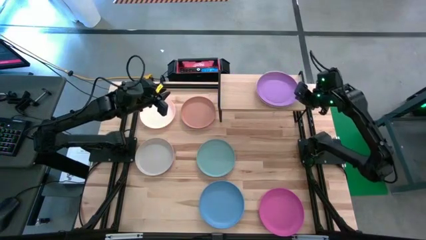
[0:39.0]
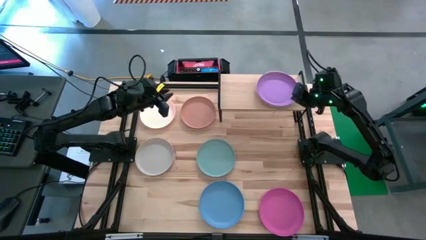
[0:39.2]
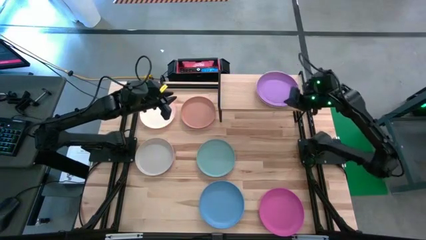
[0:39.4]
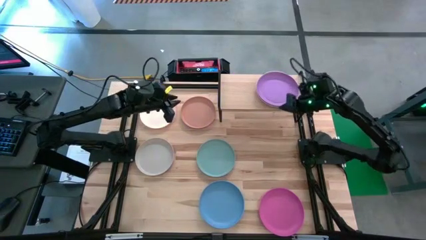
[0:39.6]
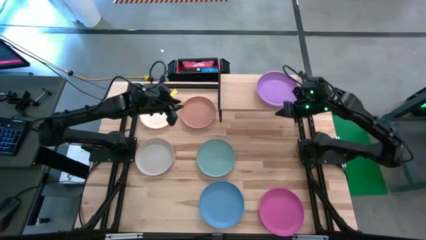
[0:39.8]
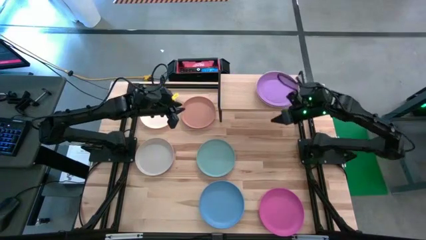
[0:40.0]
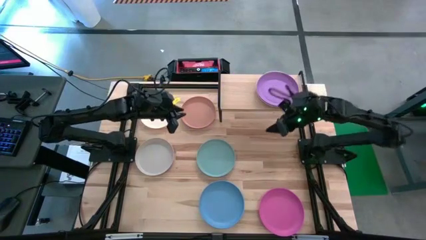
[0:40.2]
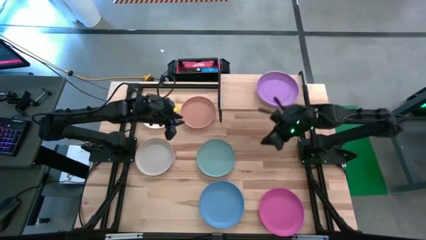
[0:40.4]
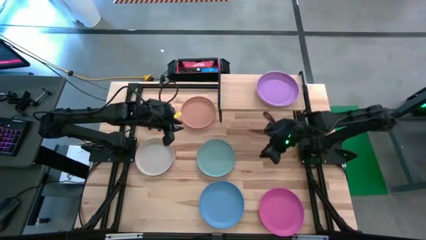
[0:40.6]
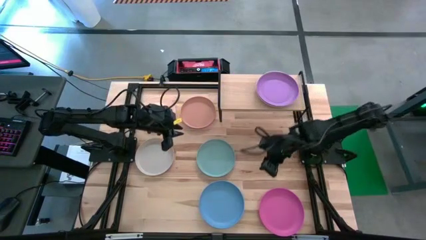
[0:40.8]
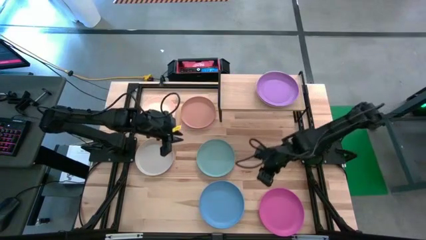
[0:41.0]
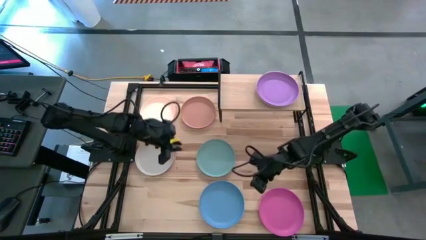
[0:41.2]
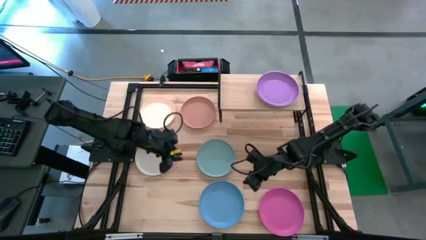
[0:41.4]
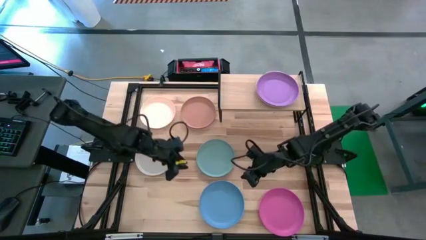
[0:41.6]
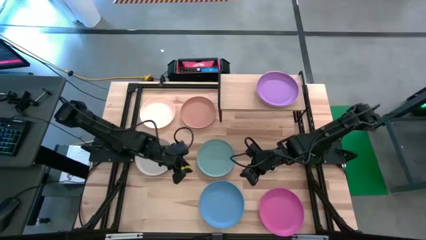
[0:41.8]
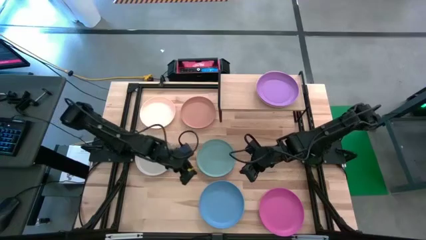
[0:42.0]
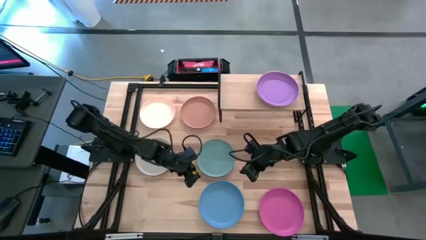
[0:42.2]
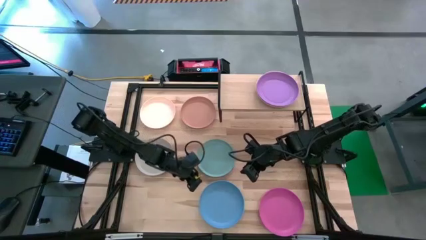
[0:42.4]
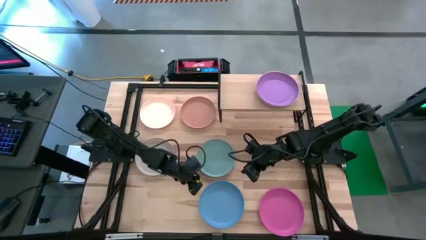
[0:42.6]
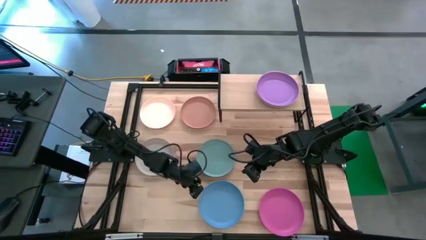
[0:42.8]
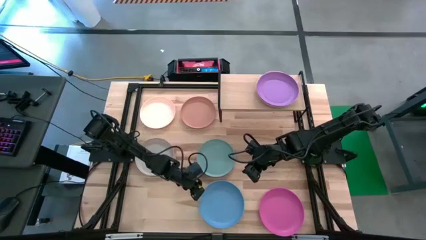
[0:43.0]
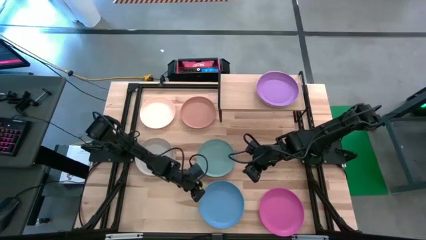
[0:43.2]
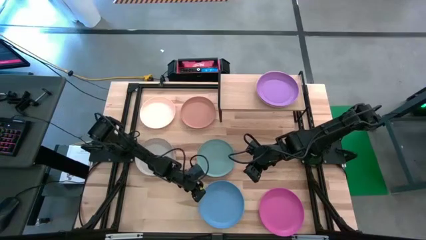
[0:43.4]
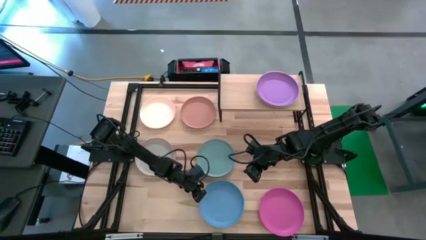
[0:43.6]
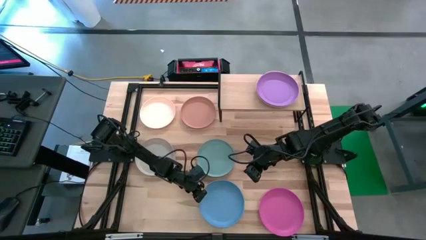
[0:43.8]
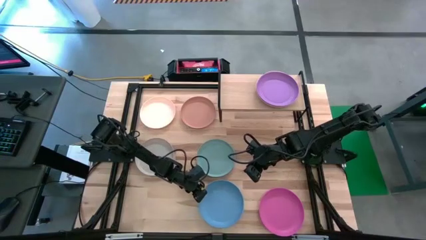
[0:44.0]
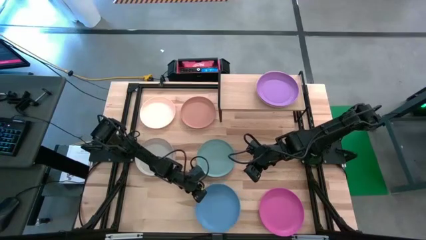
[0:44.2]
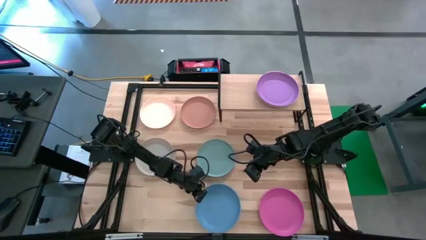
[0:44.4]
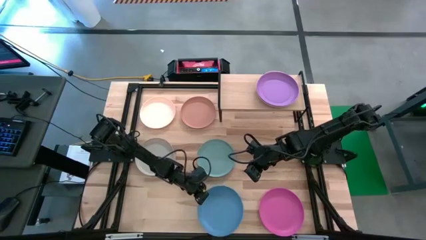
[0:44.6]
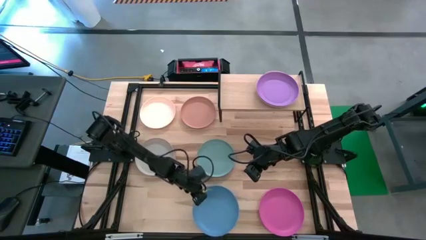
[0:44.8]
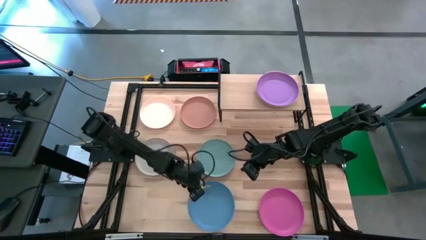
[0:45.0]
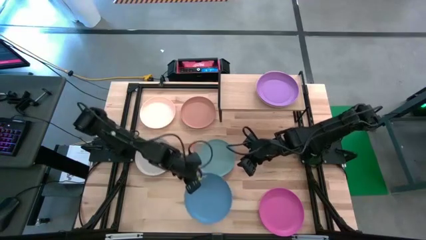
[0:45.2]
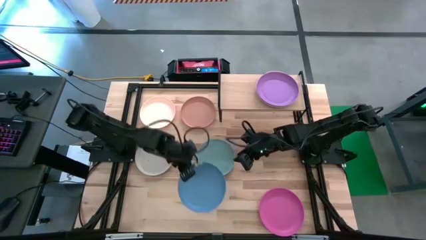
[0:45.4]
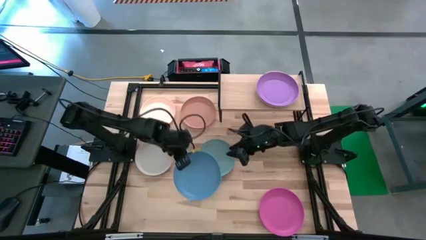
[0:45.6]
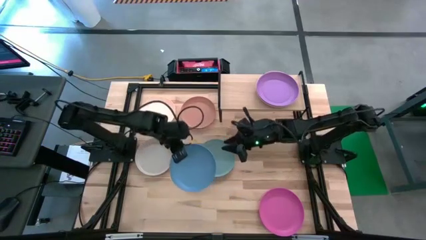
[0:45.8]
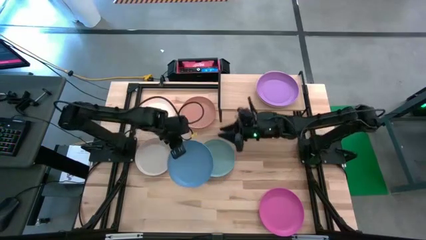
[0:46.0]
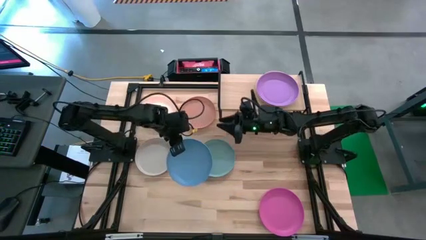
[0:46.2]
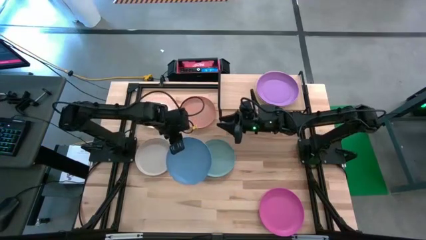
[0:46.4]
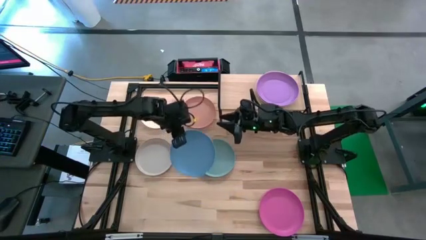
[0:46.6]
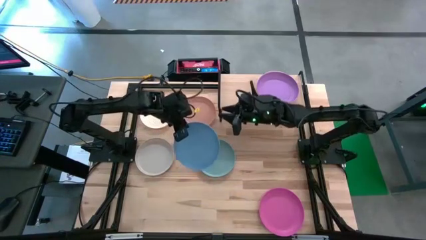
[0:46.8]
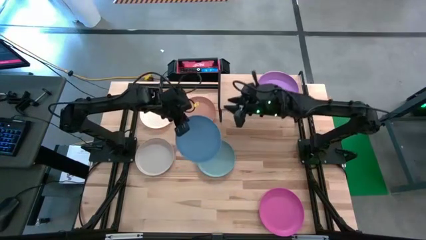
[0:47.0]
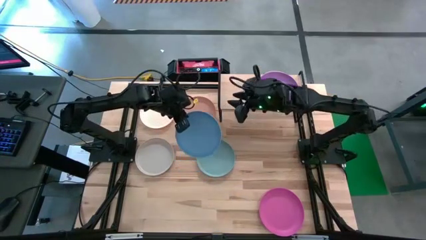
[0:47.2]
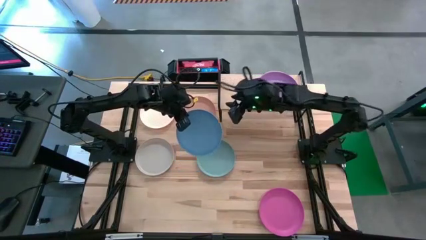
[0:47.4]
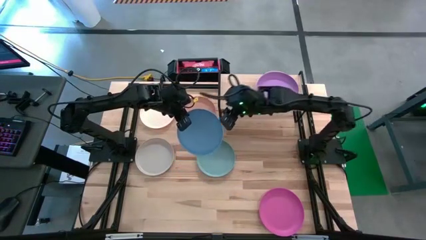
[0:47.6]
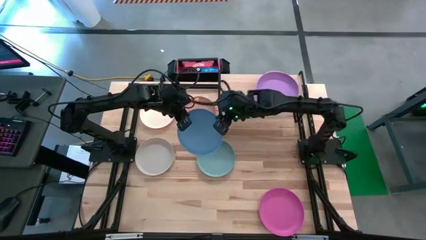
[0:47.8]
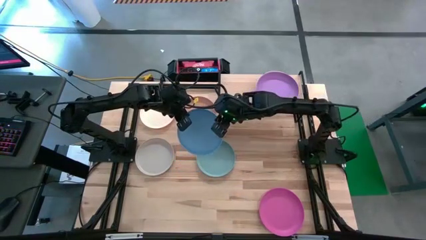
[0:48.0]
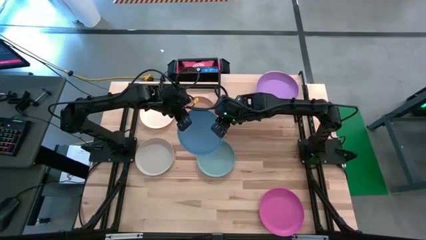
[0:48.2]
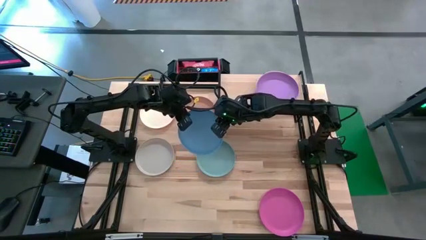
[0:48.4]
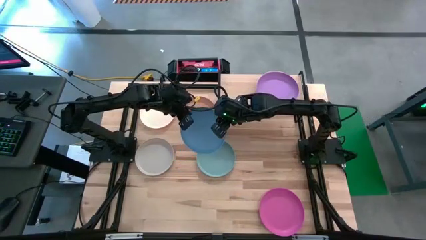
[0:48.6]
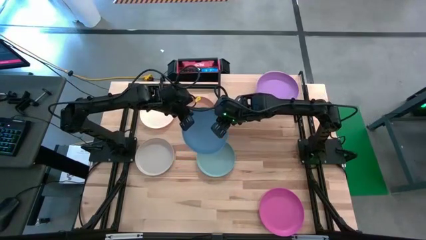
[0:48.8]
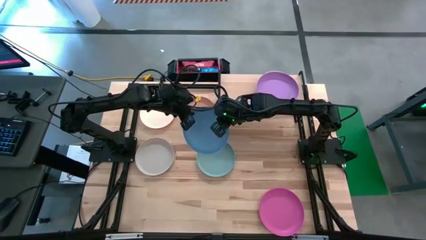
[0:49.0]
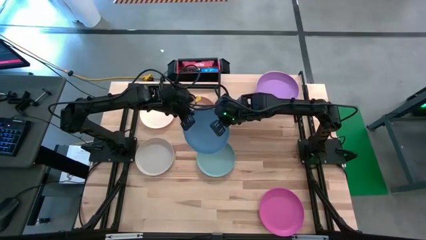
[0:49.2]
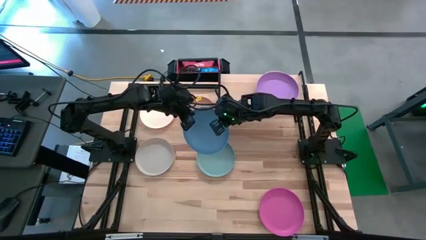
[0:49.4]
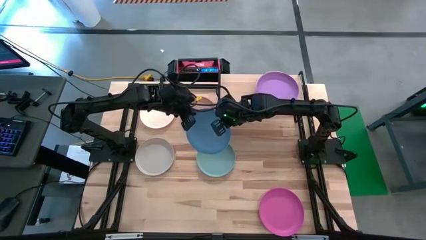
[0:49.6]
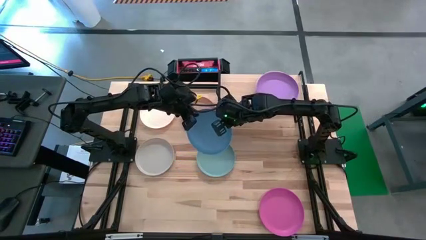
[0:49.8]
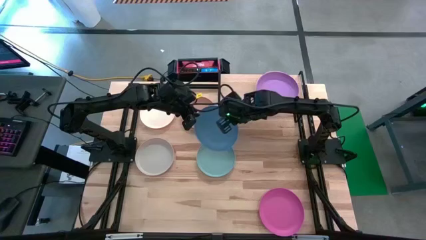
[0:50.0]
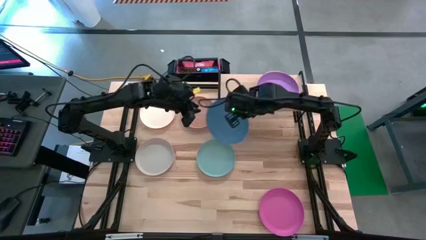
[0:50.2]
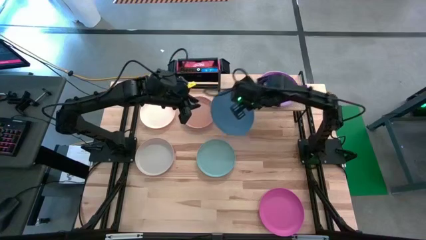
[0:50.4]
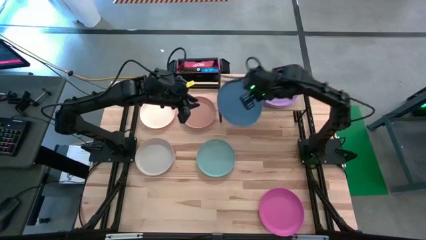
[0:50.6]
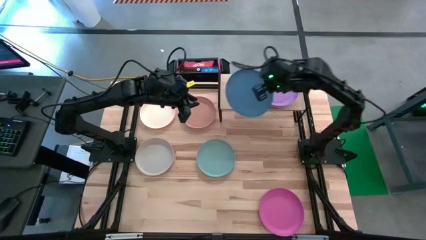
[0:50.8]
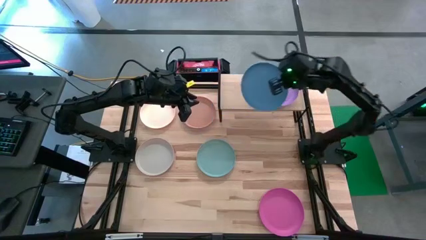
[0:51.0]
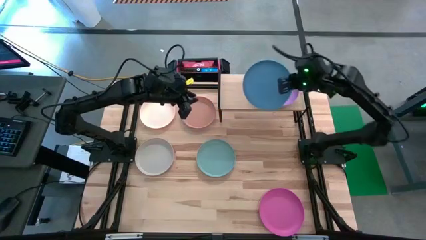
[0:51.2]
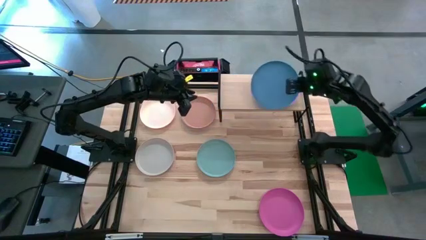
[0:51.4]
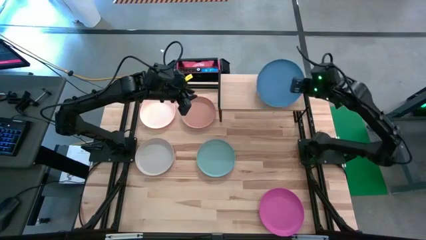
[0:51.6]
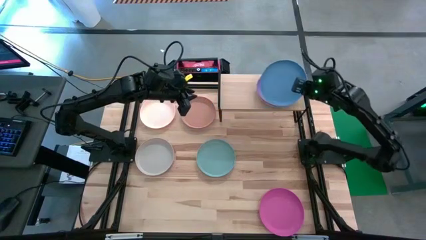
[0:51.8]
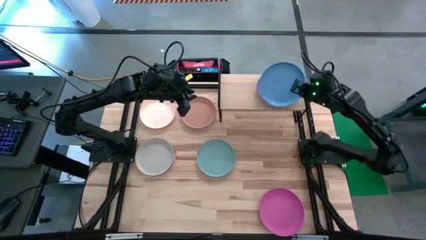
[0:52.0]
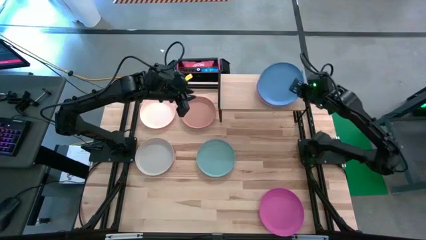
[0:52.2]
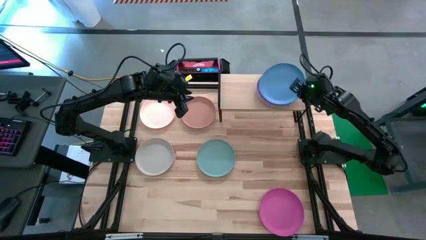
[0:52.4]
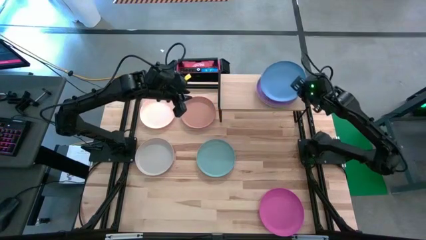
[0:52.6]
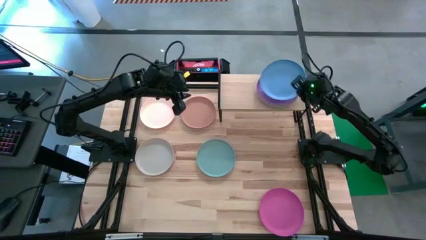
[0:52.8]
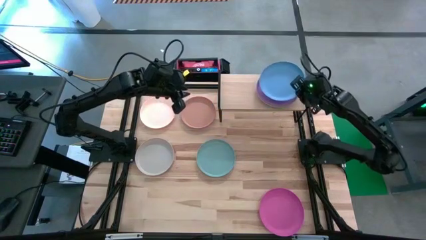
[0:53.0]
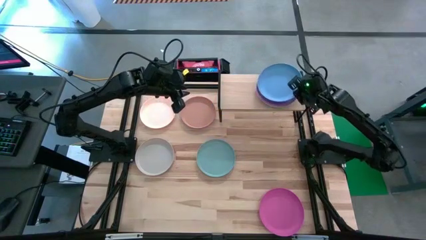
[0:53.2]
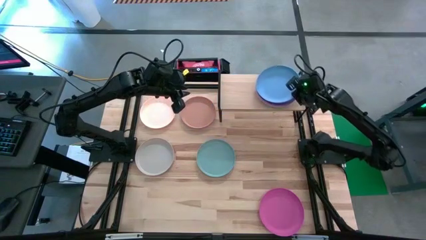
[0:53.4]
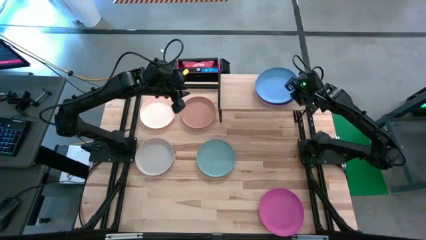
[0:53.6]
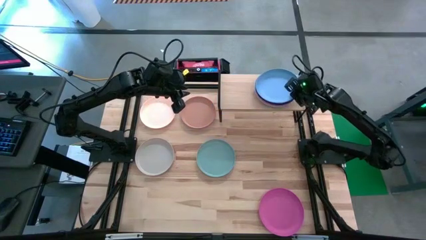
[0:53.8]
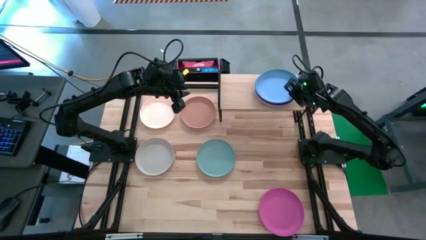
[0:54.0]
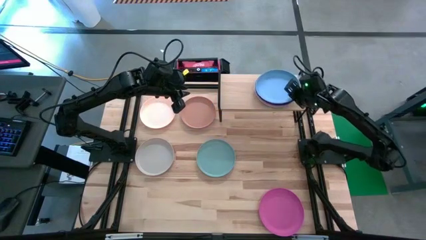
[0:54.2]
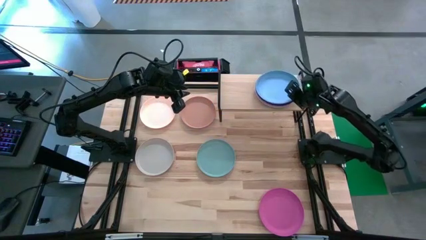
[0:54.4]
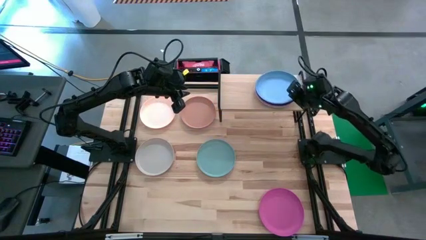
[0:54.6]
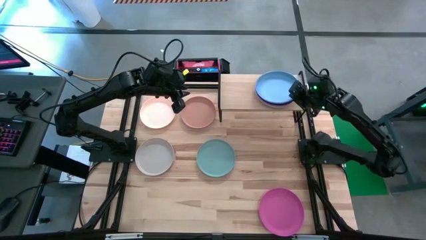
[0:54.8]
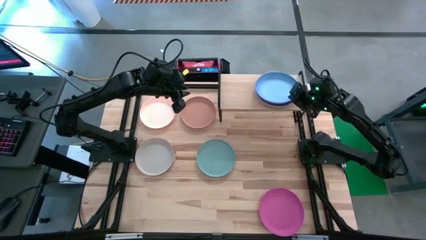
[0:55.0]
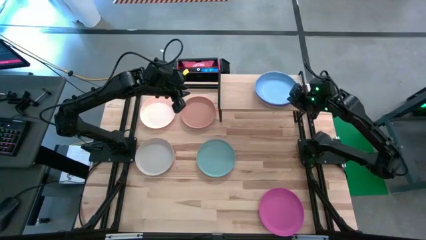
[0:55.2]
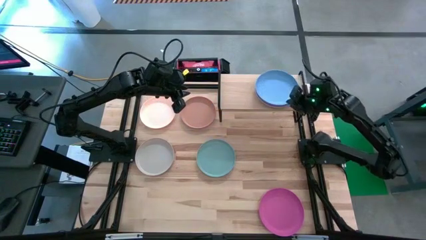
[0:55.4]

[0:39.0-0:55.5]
Task: Place and stack plates onto a shelf
Stack the blue plate on top of the purple plate on the shelf
